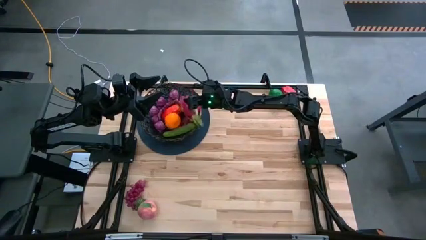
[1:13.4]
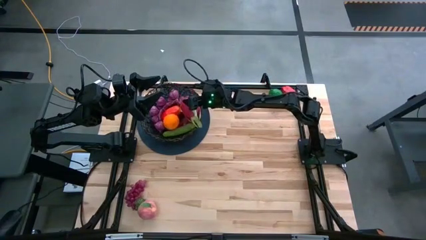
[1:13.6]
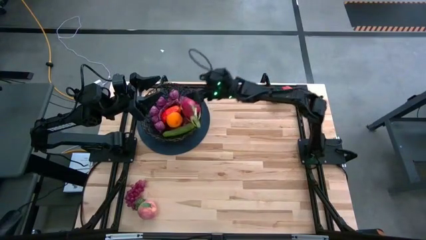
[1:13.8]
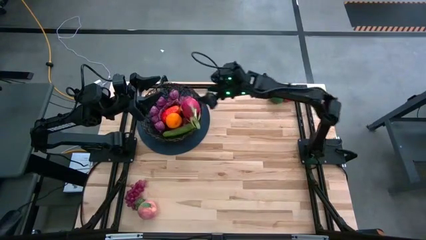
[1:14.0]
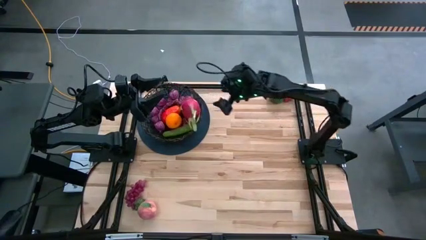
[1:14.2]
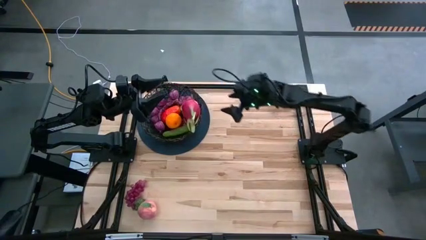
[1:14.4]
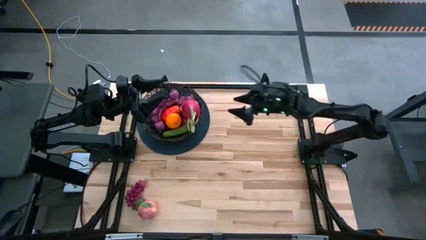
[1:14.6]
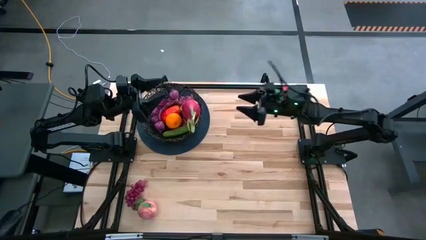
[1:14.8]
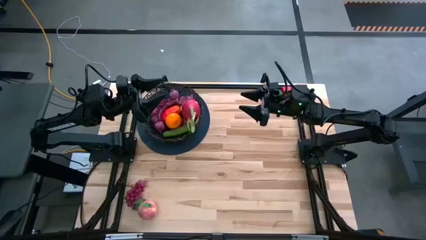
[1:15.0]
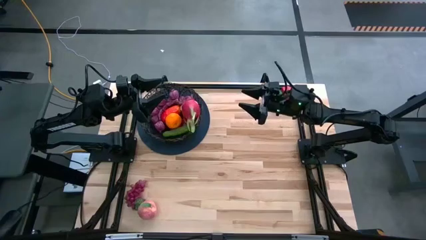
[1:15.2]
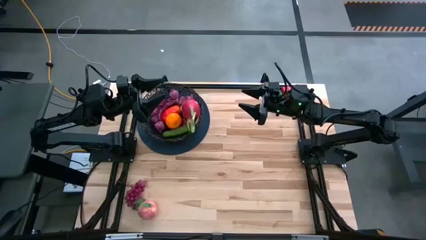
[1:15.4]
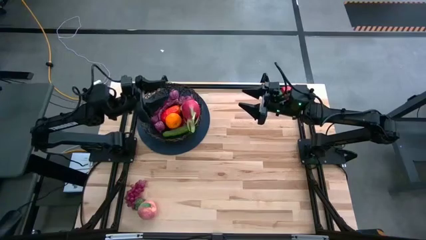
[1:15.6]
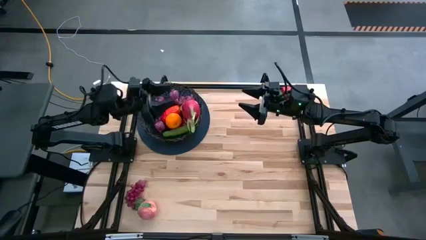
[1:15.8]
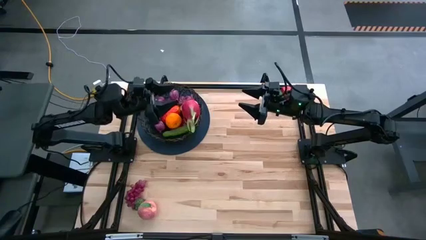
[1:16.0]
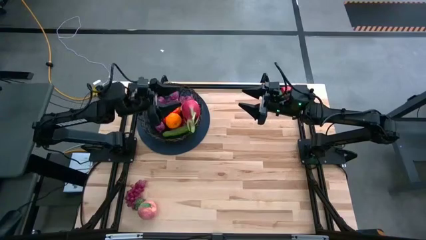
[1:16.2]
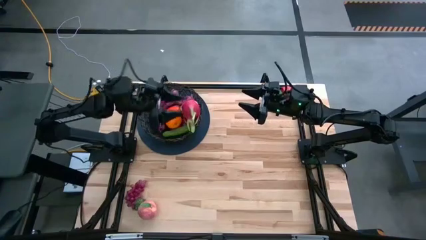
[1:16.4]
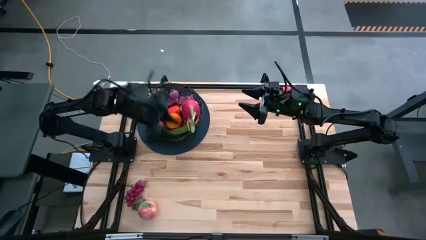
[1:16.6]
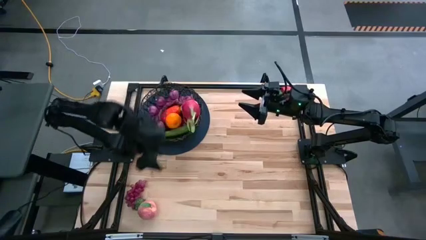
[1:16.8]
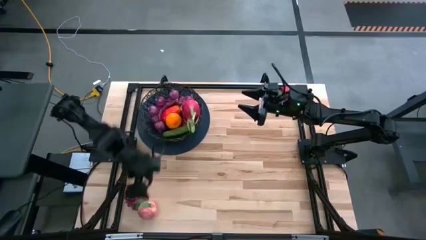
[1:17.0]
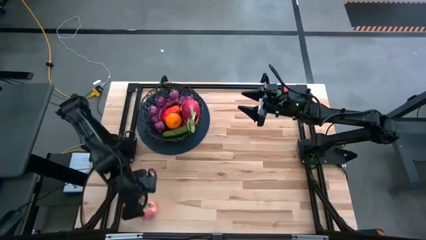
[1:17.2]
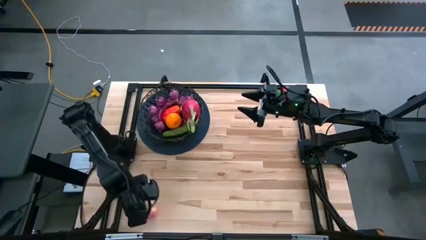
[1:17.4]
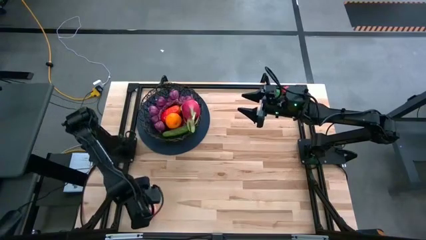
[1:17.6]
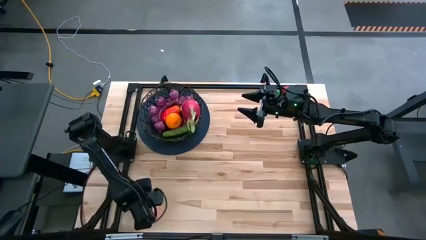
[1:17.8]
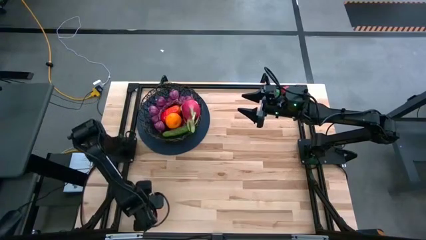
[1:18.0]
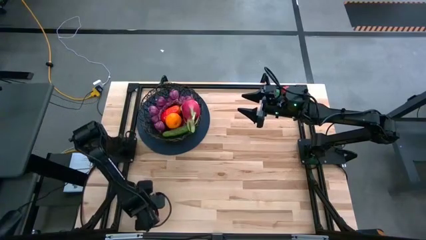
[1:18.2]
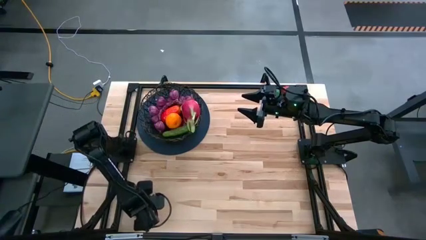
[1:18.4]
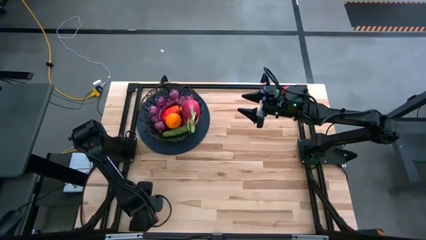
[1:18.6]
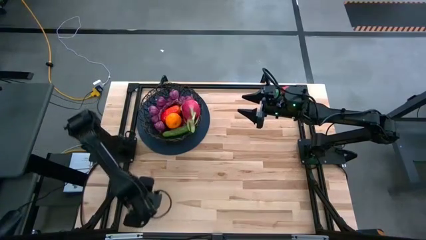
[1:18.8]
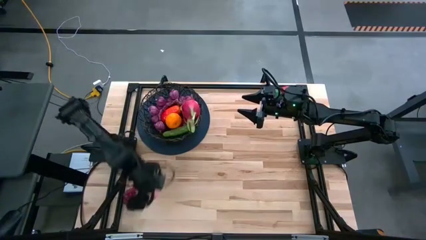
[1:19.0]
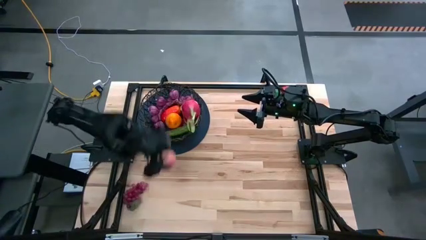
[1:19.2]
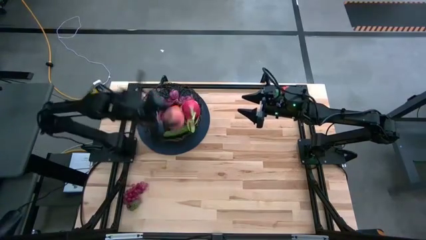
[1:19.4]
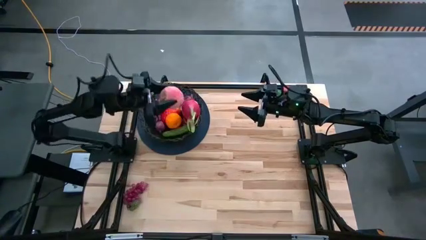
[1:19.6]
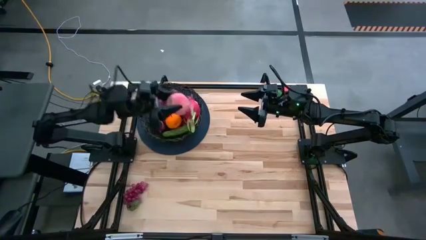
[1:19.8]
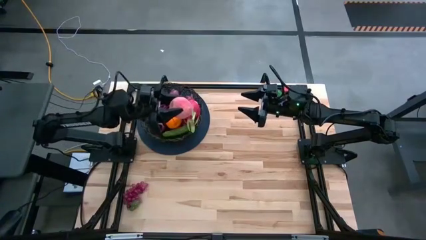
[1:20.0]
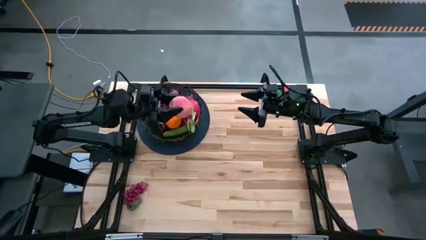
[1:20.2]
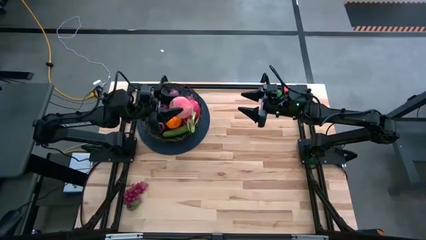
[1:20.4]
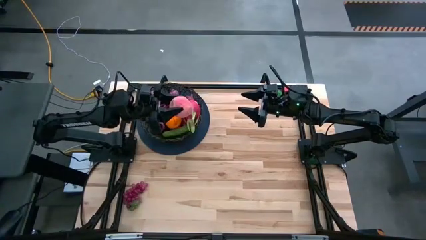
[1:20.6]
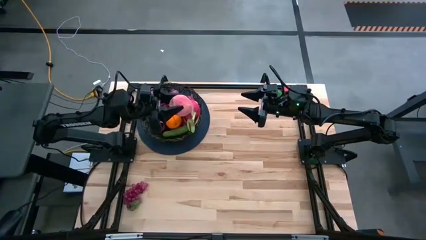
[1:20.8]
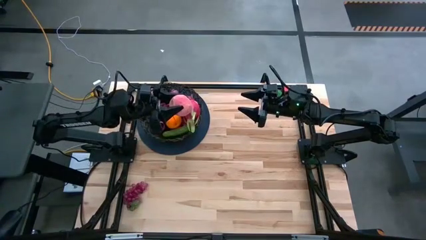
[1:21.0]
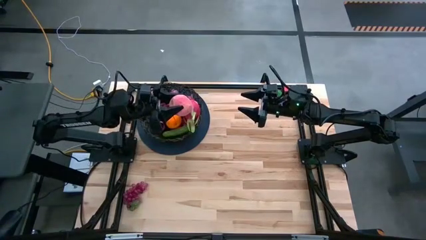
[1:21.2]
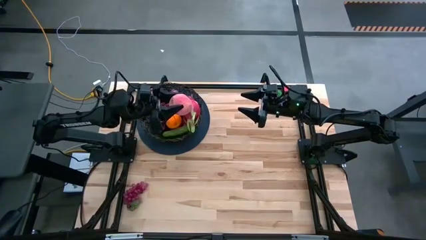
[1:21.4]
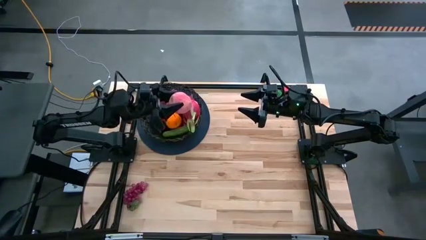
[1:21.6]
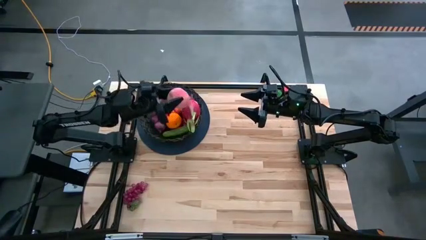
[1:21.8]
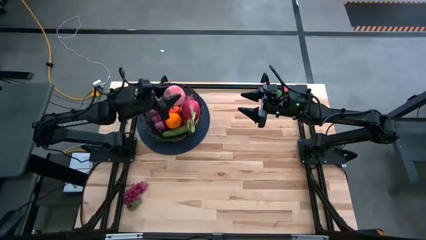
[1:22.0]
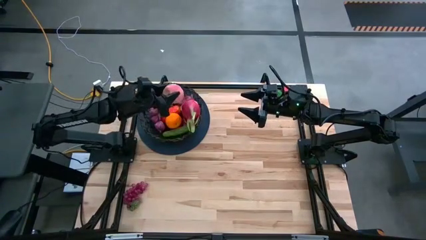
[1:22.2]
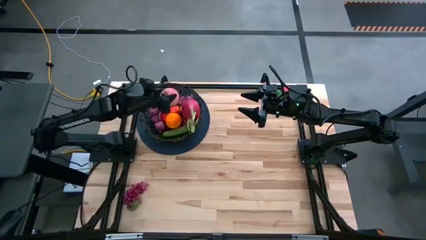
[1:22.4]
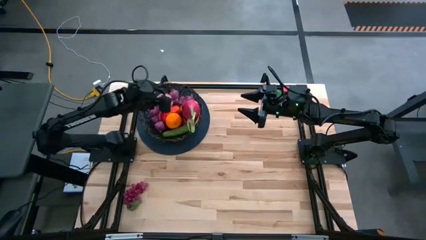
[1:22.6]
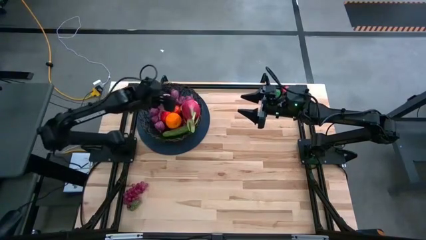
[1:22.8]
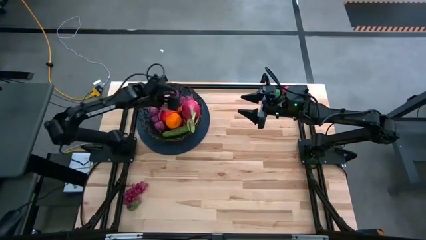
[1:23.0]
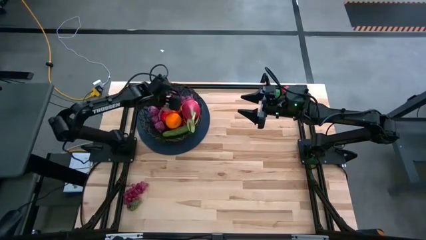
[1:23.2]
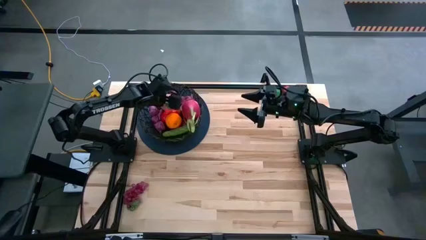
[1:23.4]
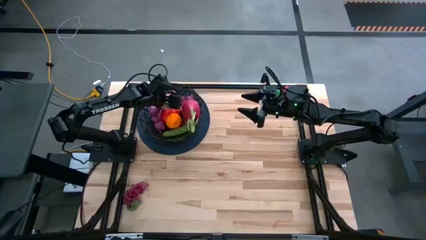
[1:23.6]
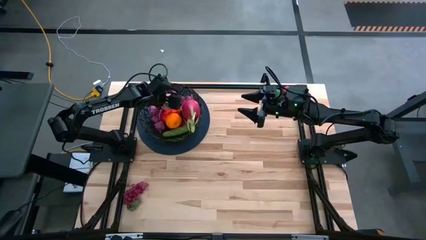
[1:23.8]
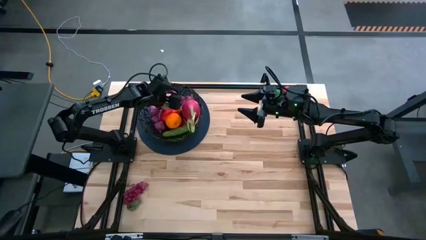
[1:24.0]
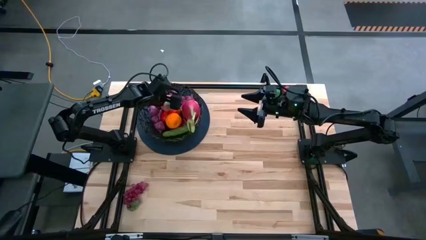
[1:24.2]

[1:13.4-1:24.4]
Task: Build produce basket
Put the pink peach into the black wire basket

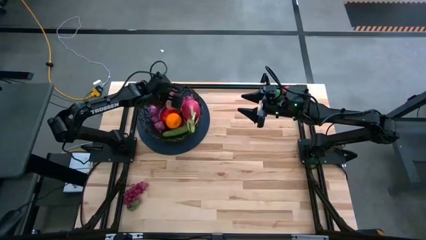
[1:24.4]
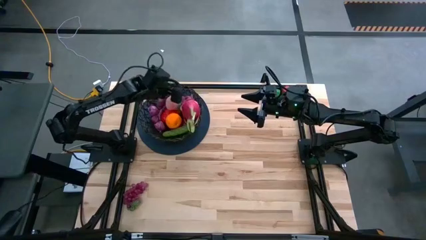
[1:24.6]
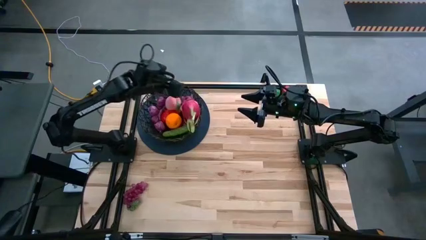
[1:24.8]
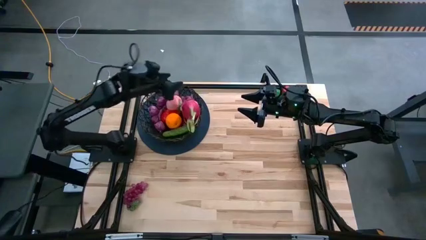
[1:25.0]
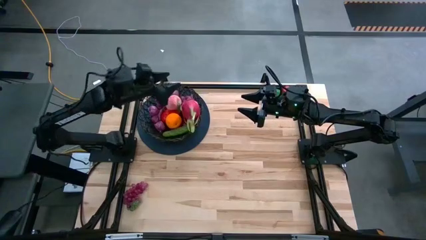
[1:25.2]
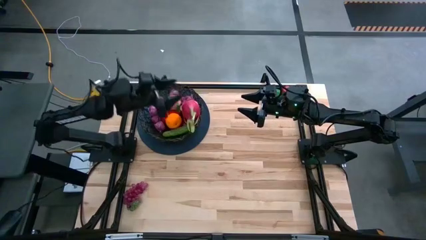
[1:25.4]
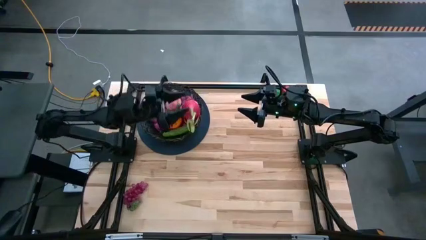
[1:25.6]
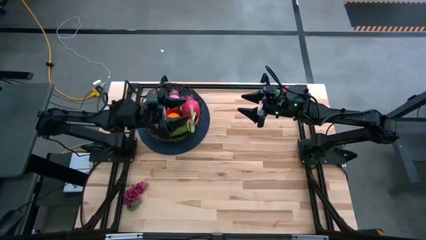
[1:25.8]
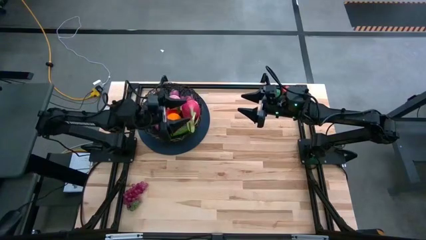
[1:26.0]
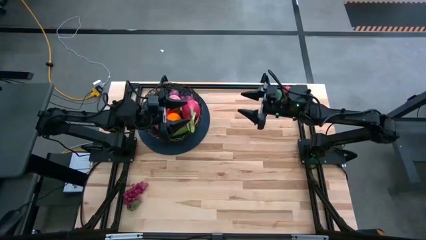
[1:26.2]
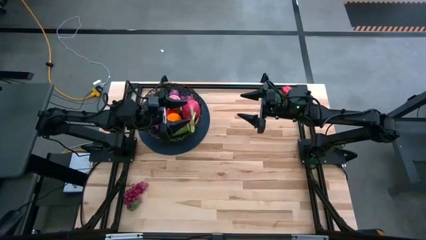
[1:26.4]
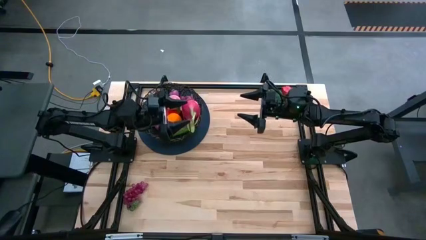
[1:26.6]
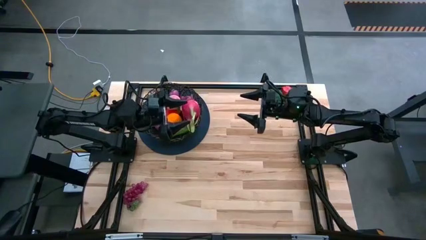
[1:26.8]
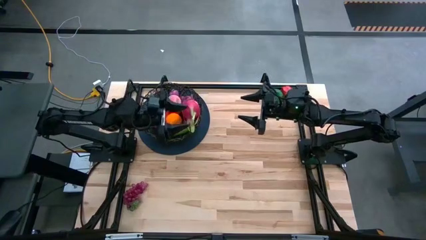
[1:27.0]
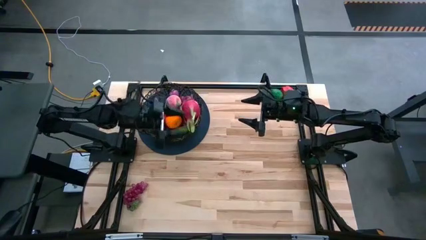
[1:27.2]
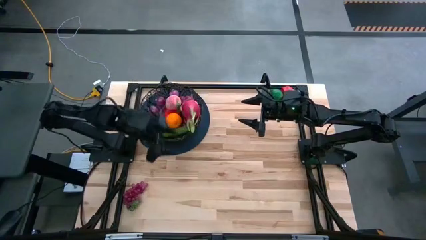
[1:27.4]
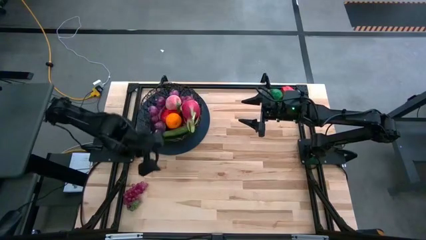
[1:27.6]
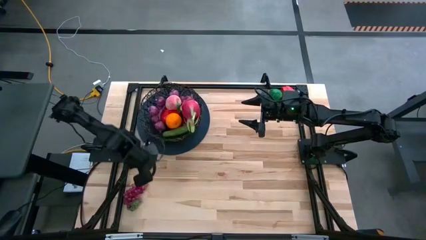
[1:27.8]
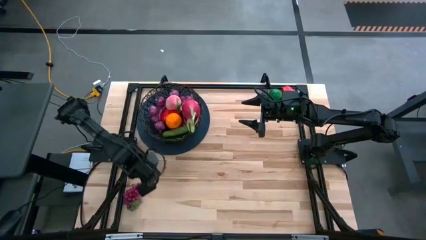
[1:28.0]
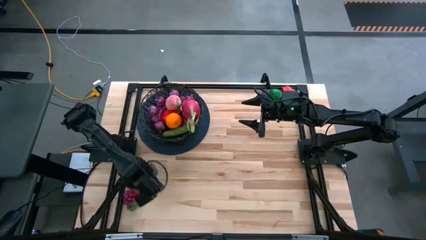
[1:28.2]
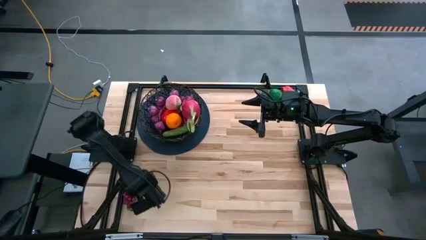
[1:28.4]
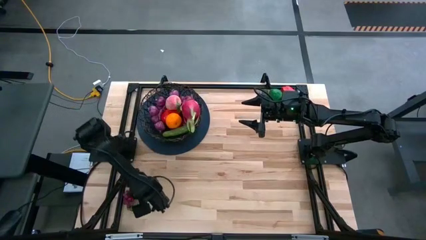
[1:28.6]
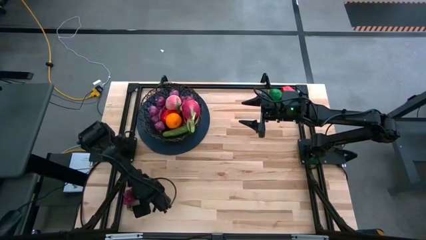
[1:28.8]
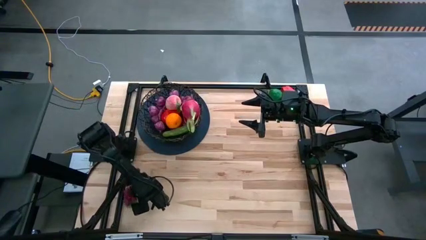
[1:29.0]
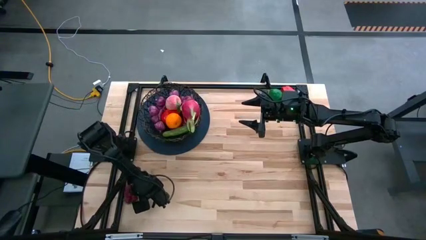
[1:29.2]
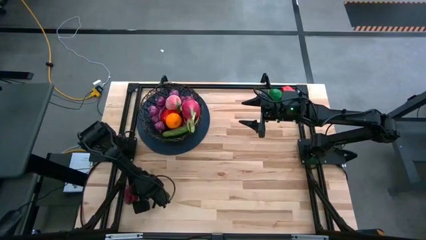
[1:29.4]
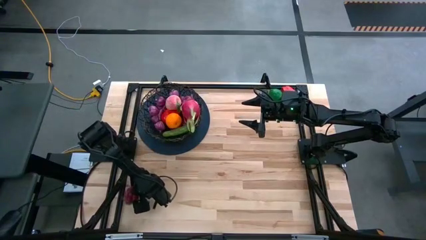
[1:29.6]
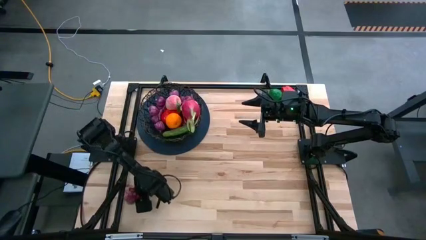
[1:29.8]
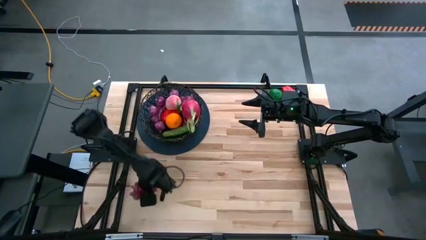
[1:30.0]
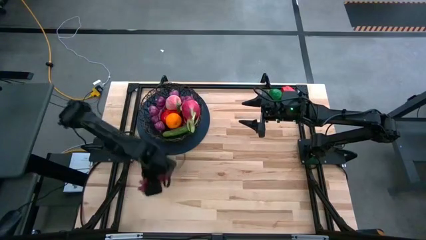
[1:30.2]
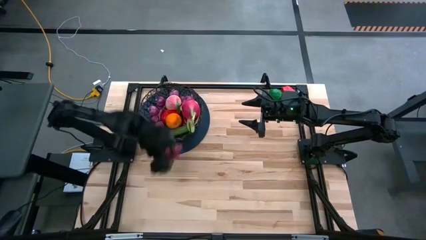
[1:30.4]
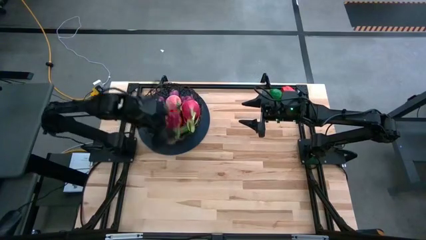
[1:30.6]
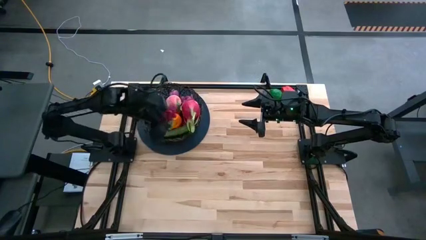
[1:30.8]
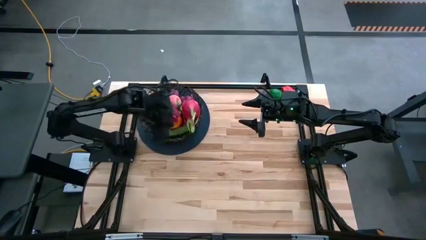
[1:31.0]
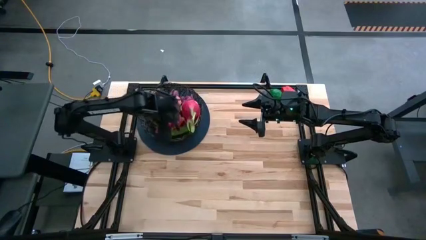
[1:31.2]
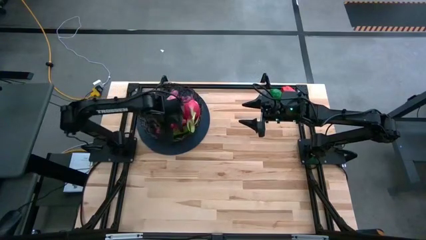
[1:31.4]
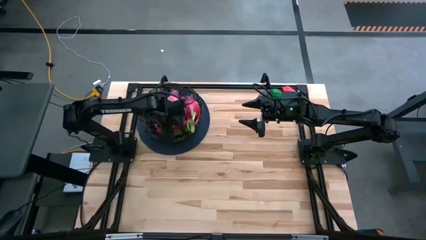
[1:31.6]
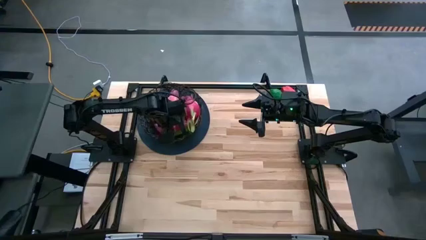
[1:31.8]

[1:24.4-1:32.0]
Put the pink grapes into the black wire basket
